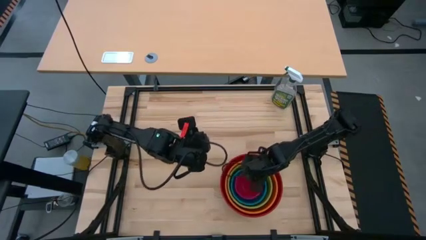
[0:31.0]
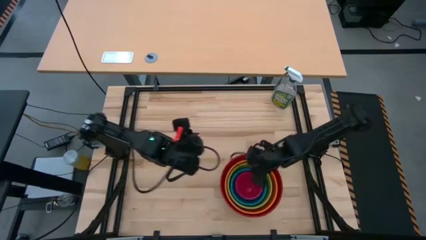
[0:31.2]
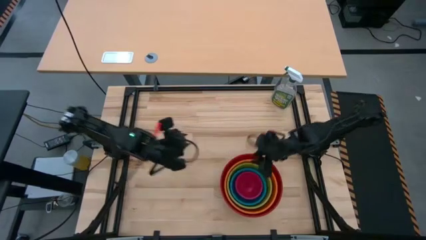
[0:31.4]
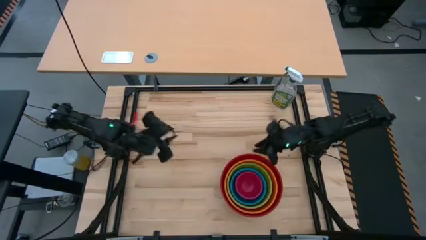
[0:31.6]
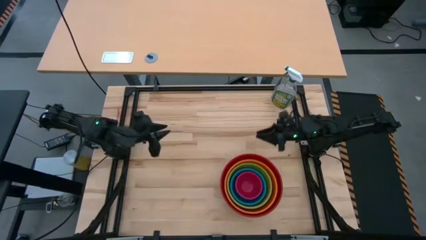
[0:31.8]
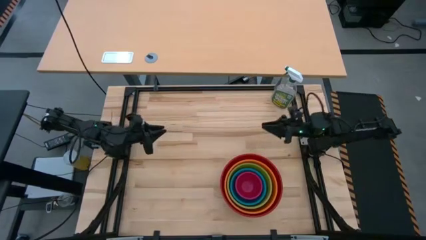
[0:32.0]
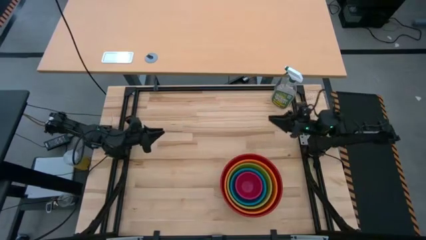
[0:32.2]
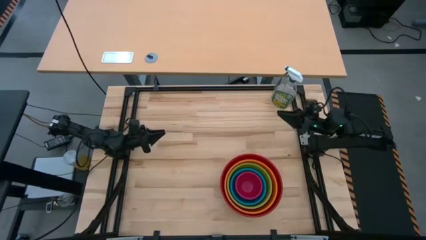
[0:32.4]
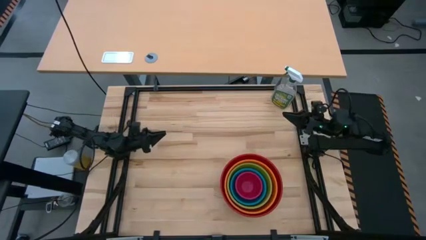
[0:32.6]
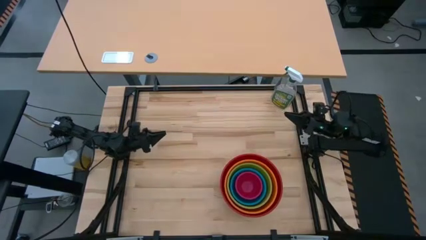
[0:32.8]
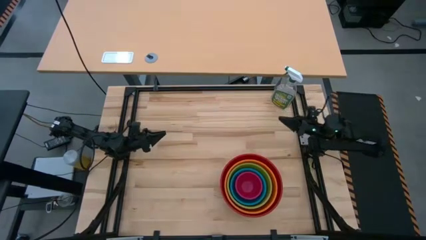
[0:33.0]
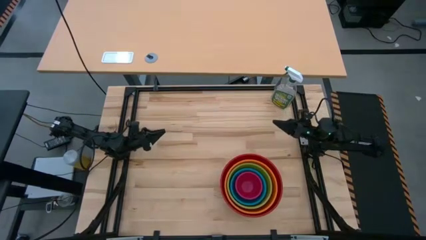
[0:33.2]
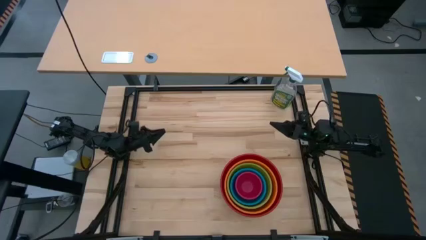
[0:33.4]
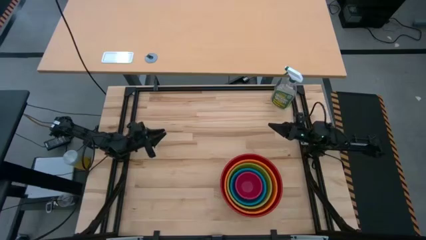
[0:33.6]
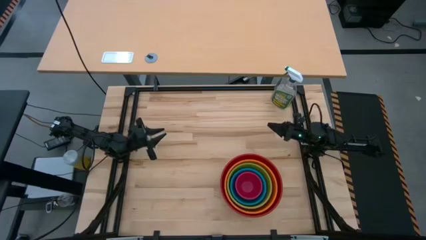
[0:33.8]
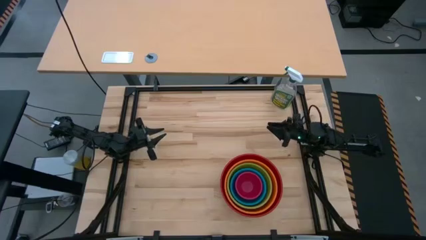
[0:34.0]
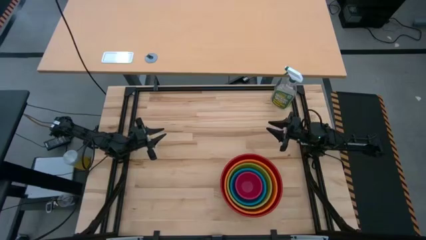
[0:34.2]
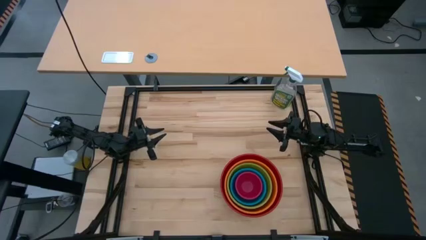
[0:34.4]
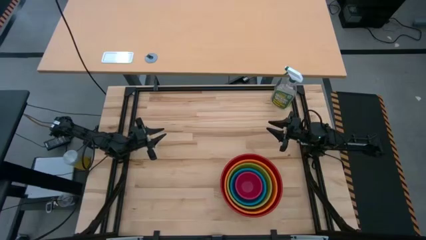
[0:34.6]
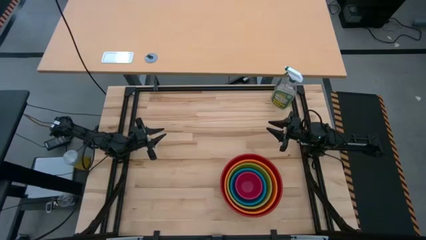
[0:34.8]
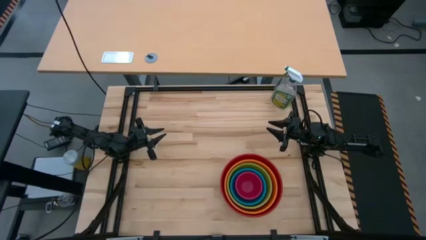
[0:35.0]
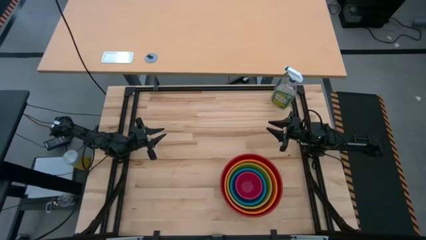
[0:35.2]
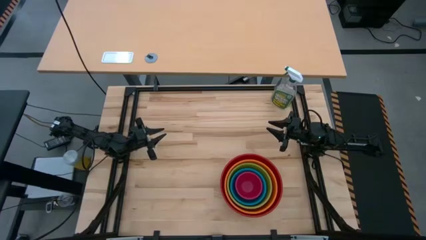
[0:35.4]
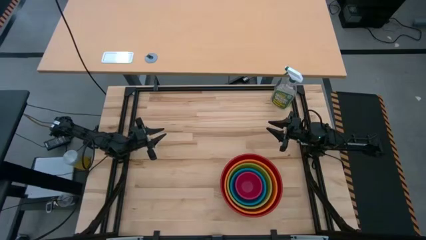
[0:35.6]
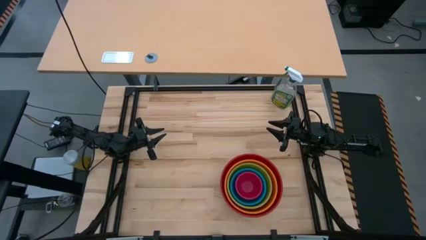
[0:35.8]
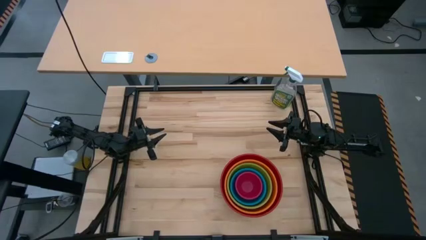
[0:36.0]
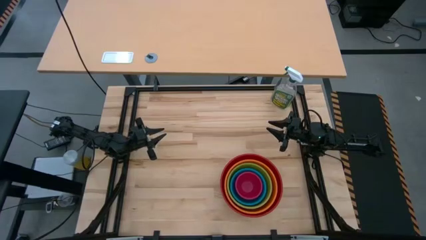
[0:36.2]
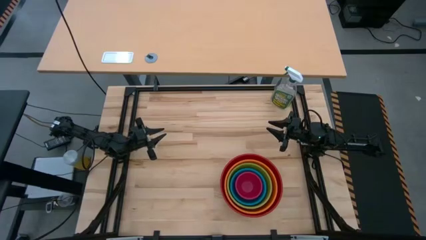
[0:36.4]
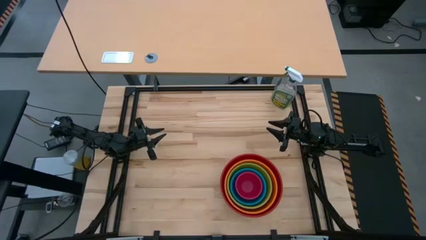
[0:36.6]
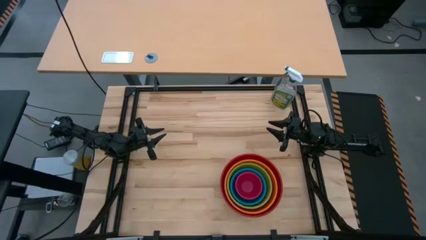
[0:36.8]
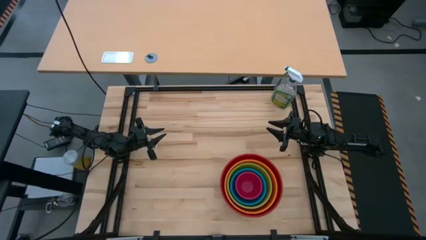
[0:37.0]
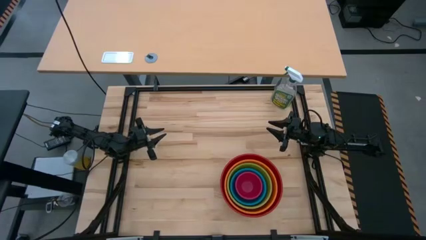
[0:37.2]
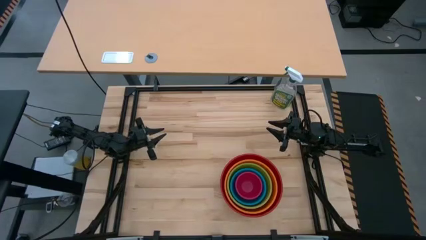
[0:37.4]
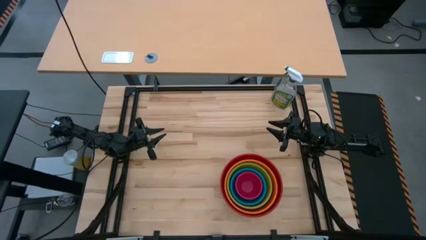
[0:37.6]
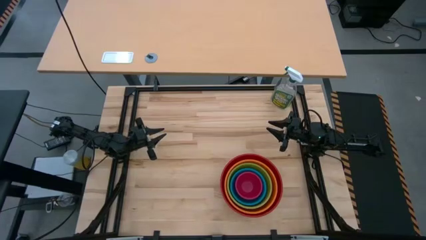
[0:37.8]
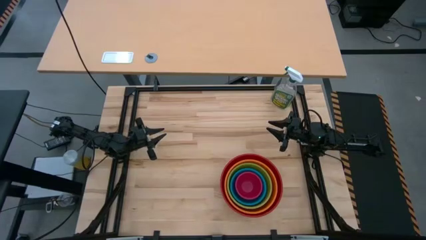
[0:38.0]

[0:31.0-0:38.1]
Return to Home Position

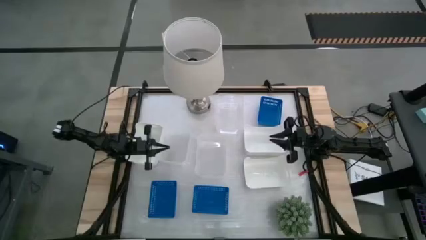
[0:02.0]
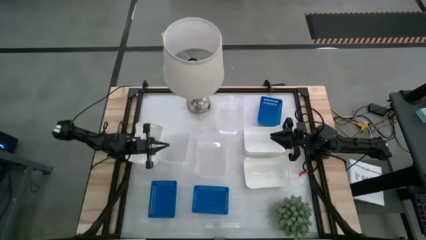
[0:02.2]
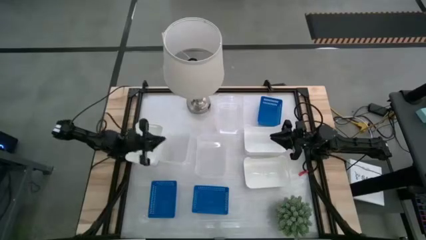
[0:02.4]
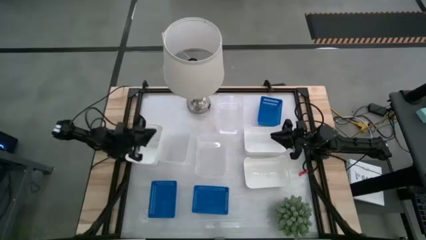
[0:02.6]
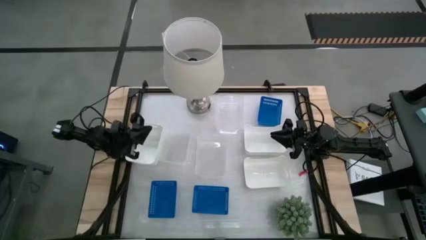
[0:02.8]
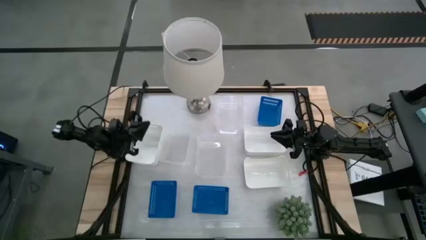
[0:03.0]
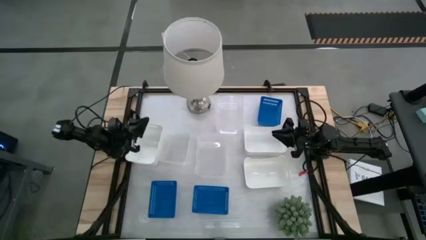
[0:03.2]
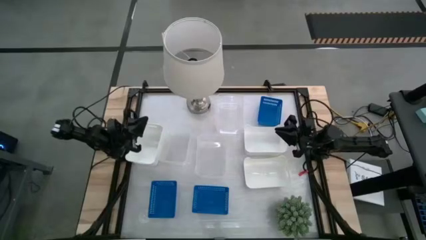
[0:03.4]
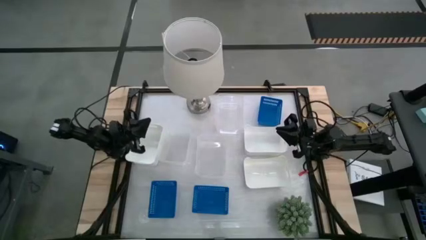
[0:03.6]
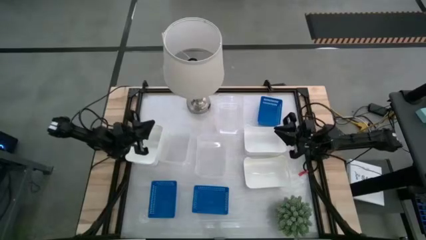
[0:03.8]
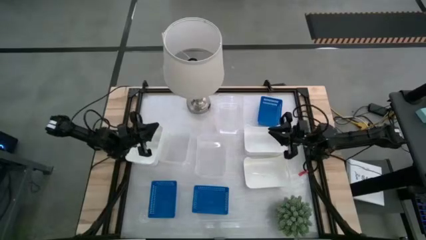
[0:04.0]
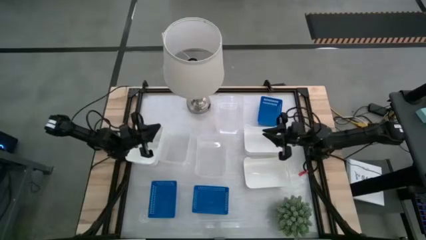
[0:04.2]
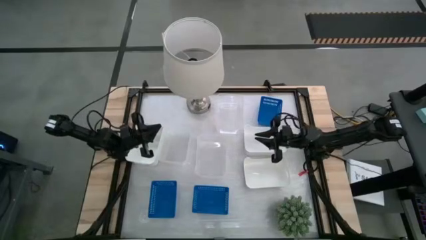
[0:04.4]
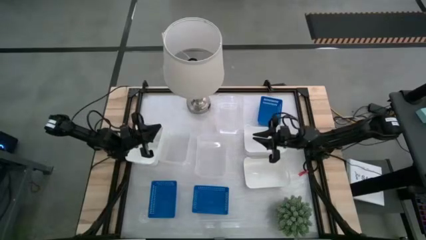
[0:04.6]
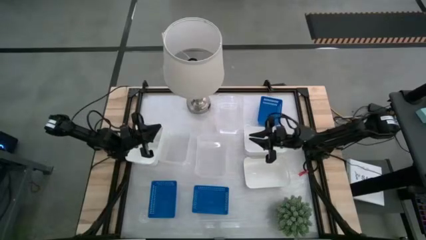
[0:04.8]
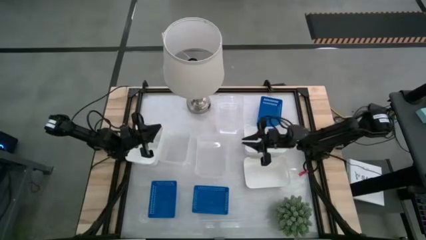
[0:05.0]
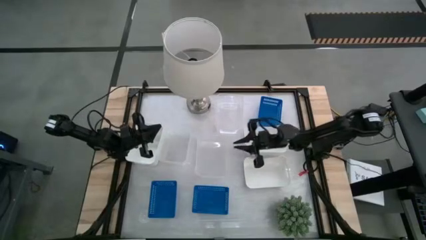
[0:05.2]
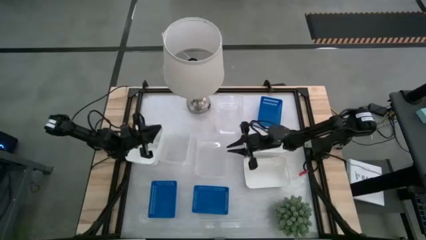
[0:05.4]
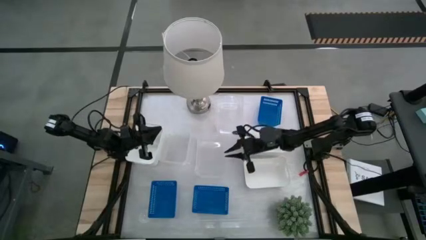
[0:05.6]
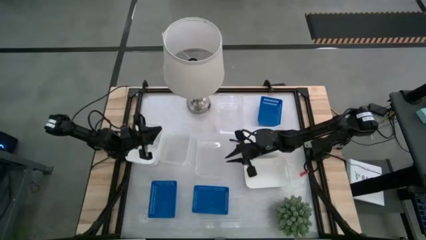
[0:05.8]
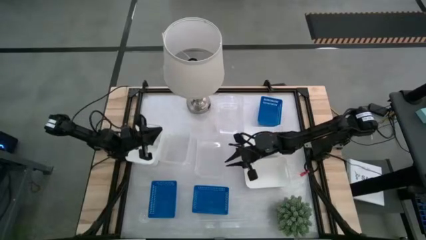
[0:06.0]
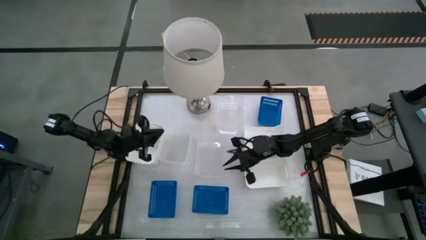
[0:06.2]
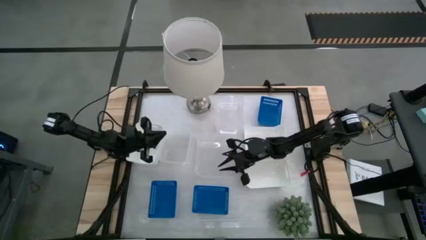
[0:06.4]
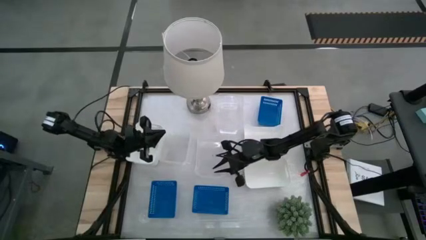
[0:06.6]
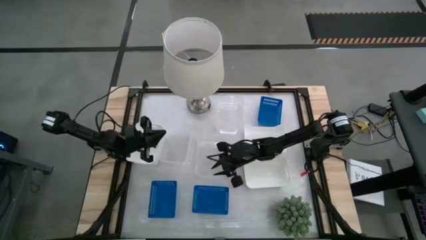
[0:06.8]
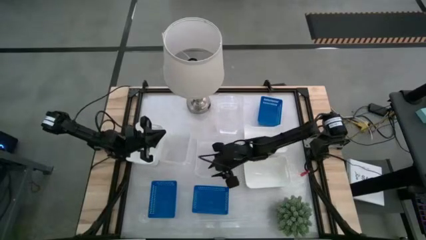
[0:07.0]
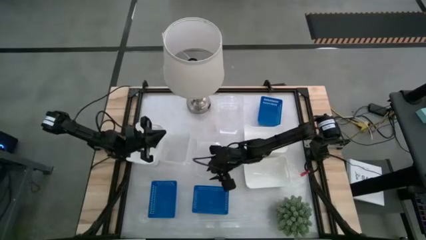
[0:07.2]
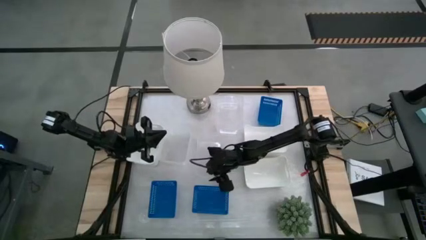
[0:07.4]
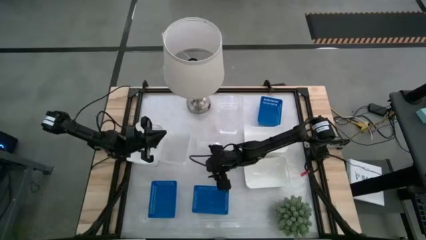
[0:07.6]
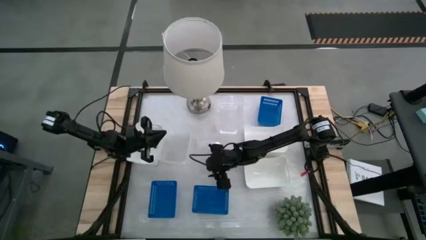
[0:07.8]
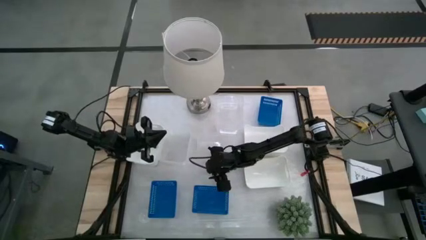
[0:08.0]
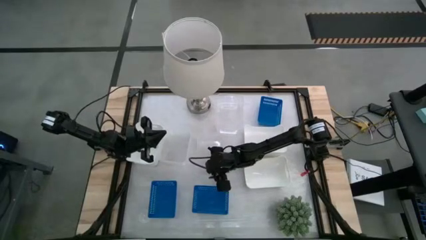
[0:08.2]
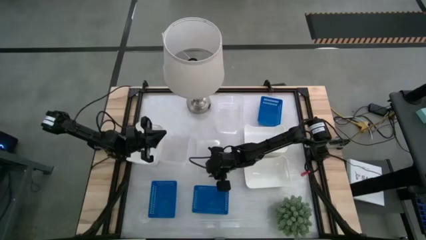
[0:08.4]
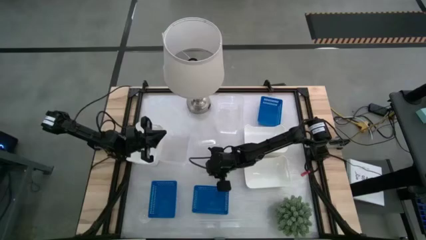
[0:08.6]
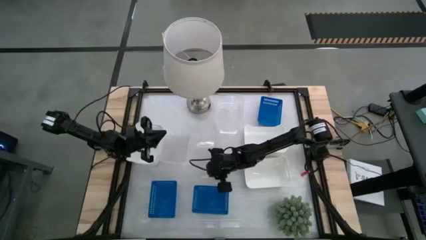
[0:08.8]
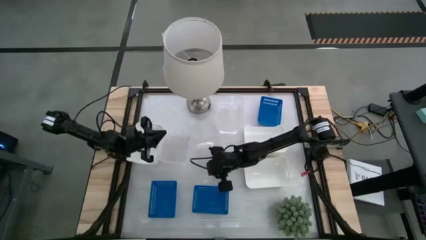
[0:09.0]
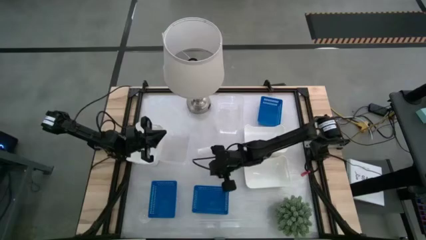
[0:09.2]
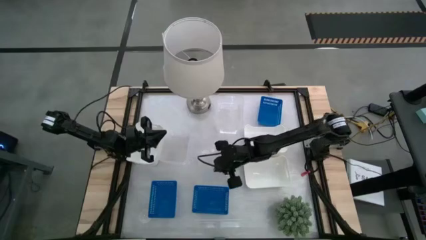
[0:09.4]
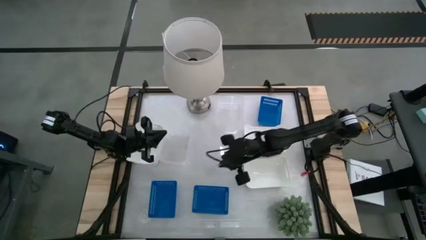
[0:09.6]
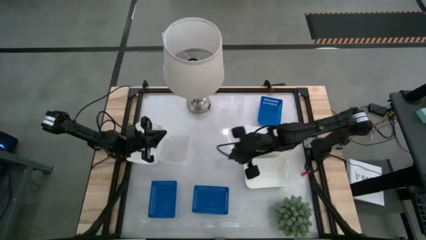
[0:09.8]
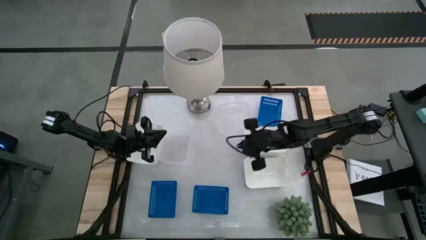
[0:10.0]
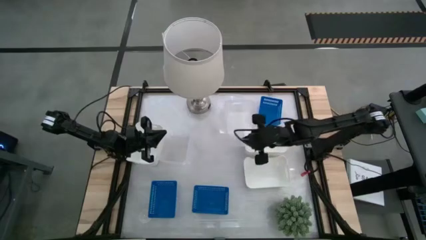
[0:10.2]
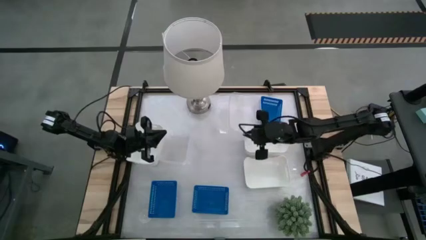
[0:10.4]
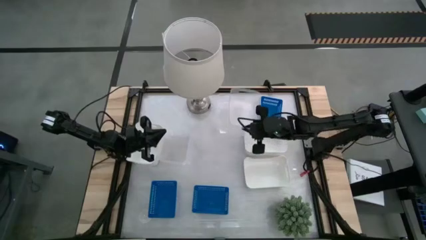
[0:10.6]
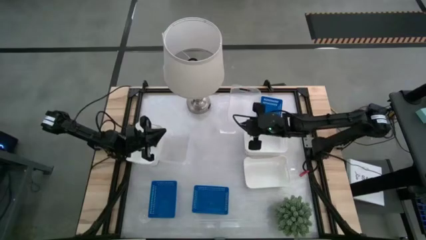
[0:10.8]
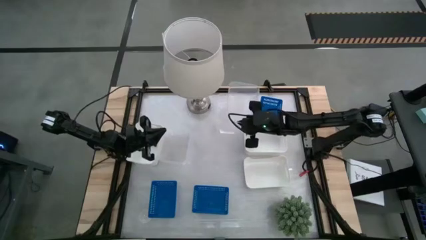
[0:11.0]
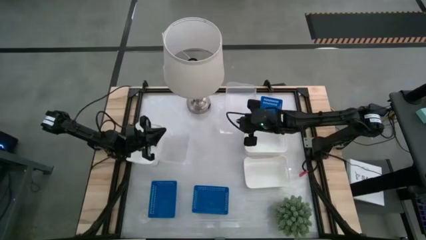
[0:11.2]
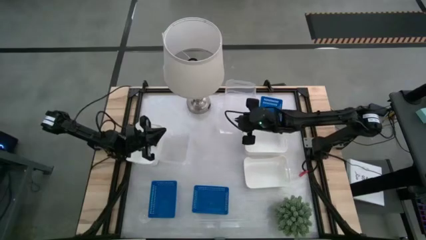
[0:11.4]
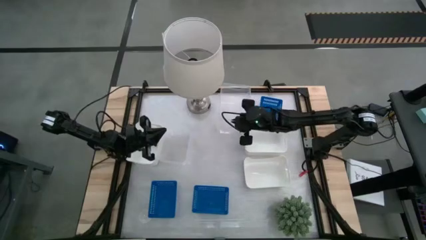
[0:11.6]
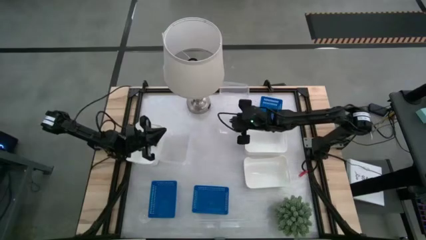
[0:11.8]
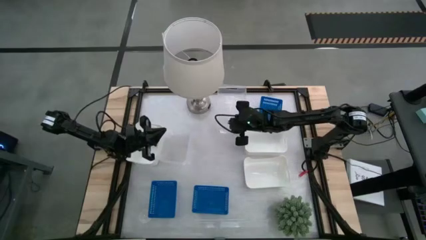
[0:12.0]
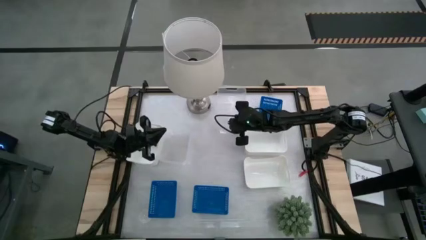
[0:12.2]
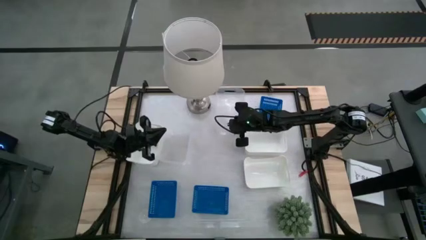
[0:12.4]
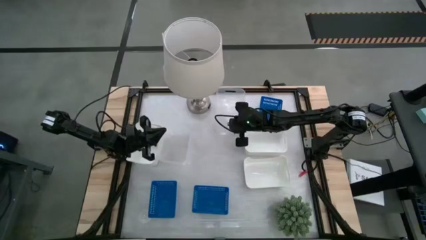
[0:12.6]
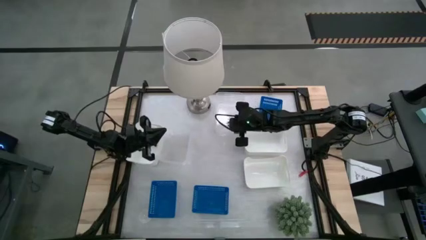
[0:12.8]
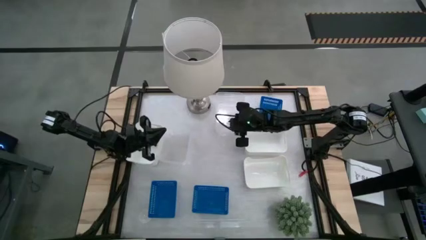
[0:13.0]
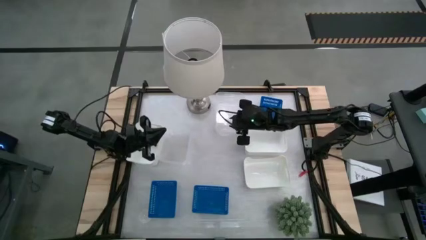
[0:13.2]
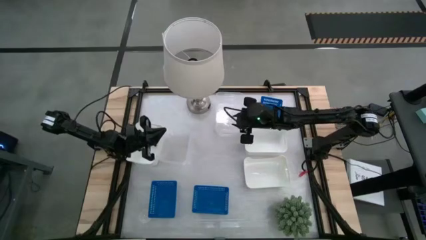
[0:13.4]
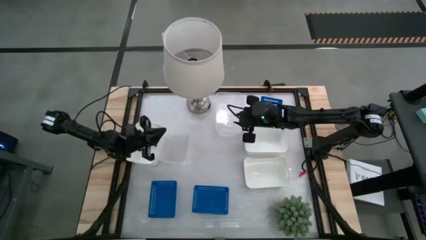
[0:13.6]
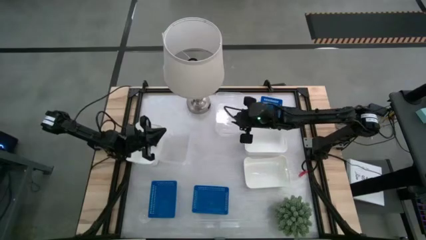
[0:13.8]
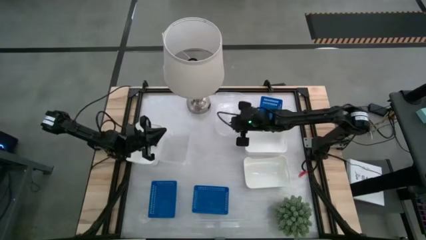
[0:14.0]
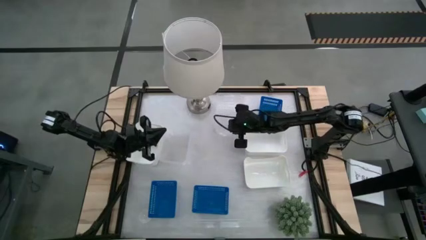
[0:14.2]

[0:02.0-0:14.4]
Stack the bottom right transparent bin on the transparent bin
